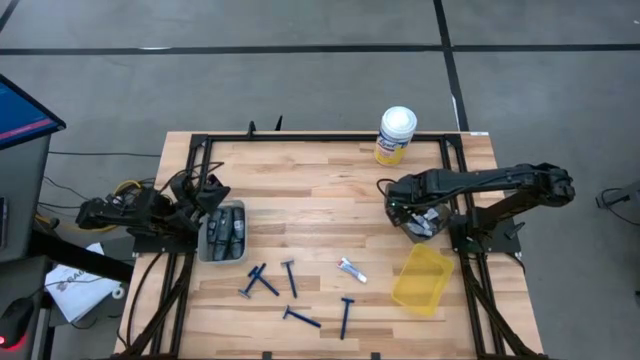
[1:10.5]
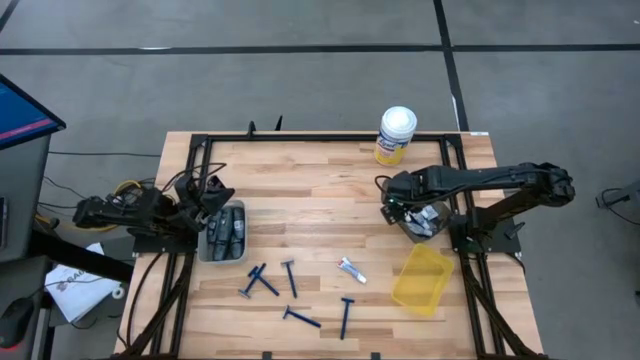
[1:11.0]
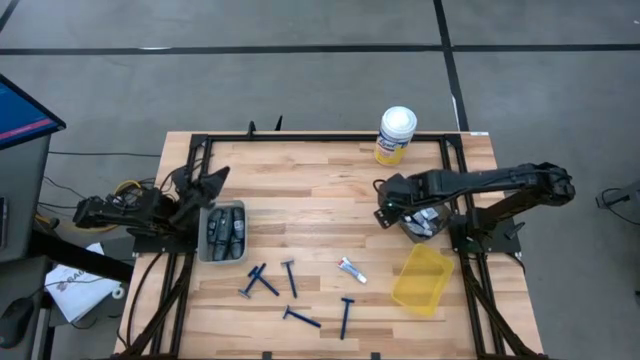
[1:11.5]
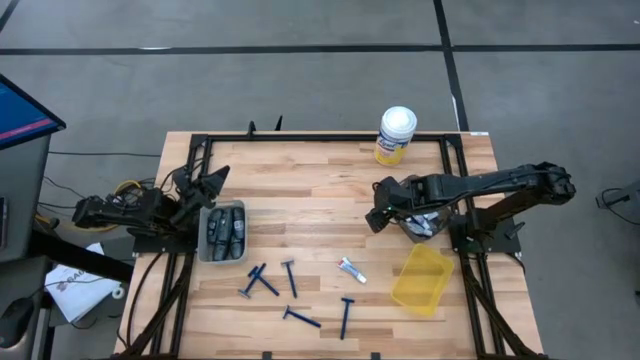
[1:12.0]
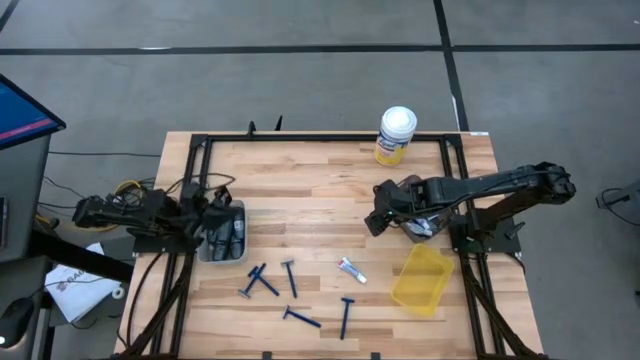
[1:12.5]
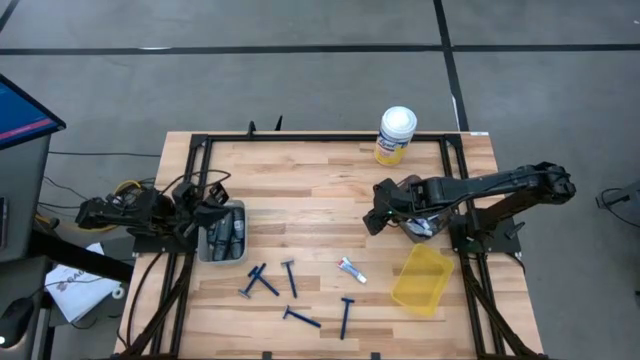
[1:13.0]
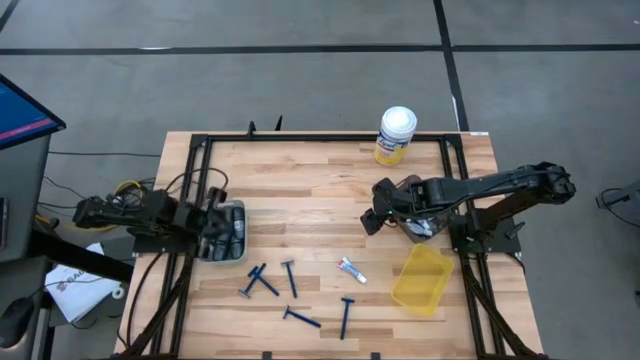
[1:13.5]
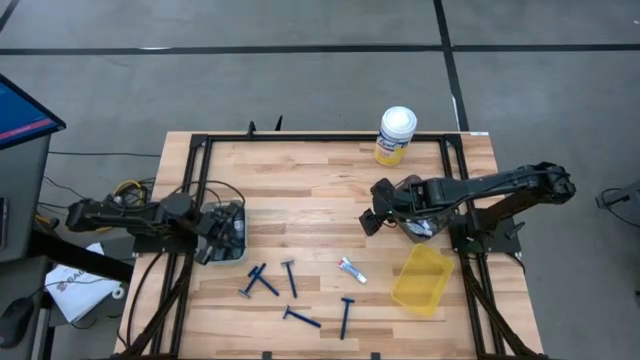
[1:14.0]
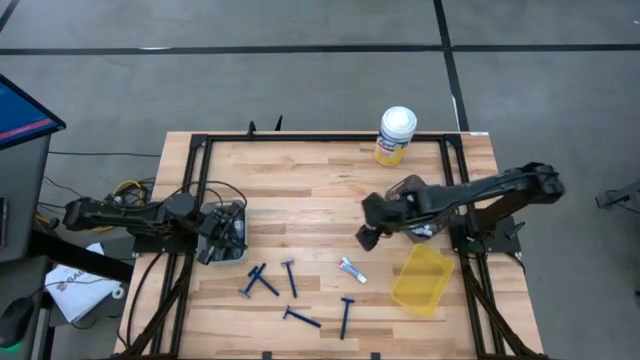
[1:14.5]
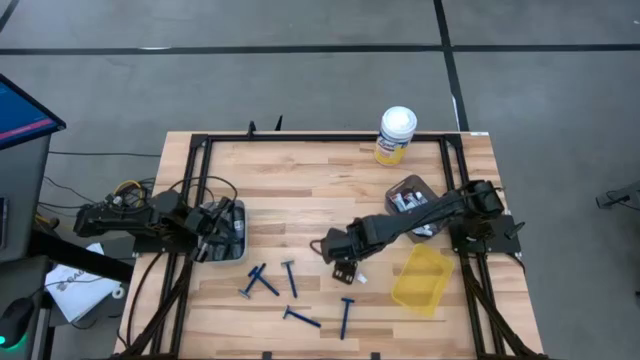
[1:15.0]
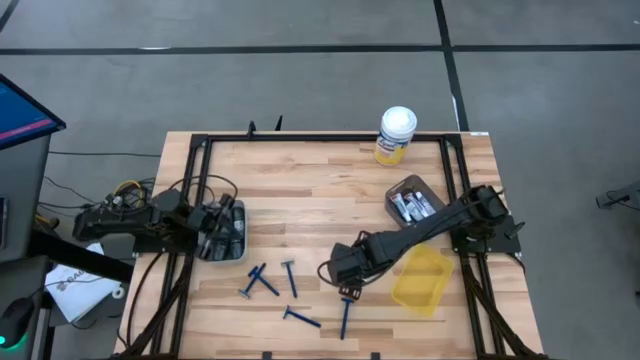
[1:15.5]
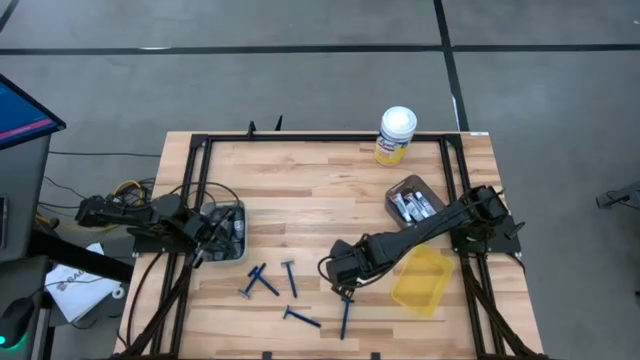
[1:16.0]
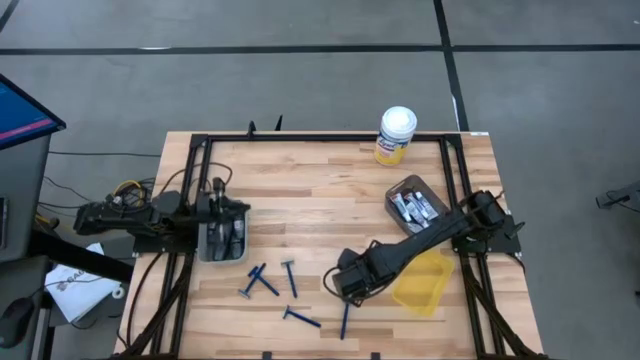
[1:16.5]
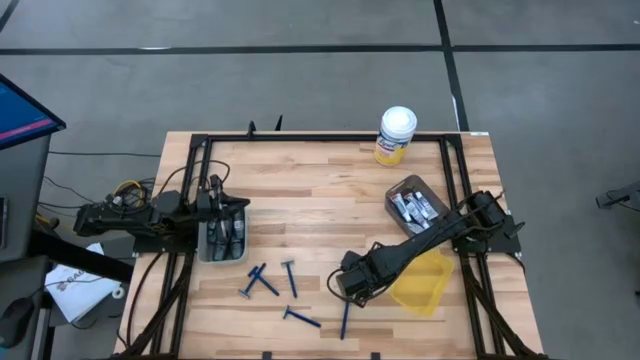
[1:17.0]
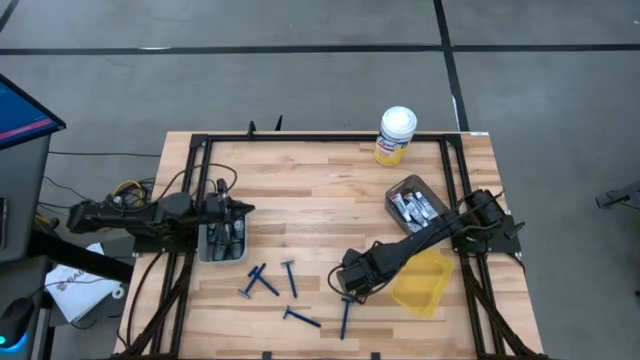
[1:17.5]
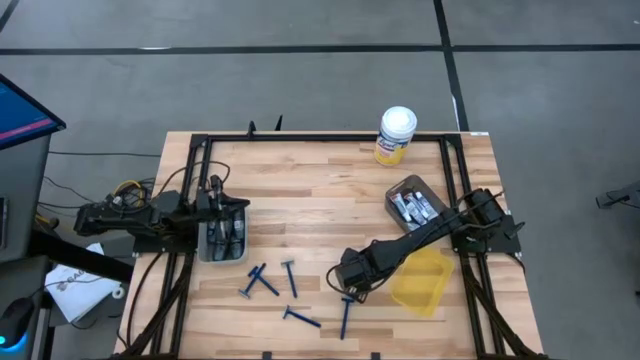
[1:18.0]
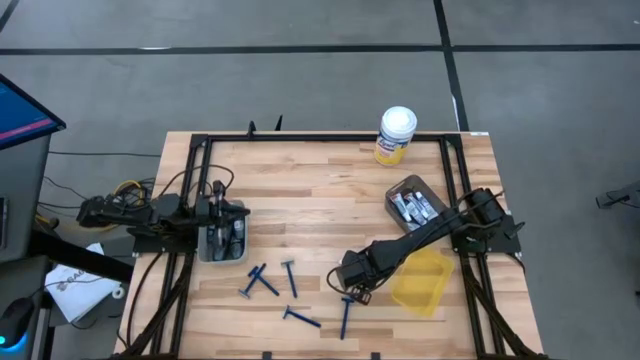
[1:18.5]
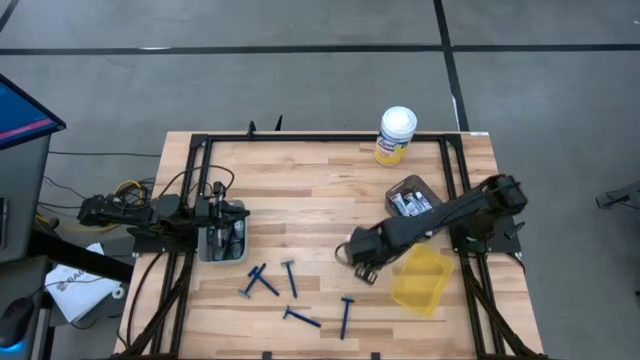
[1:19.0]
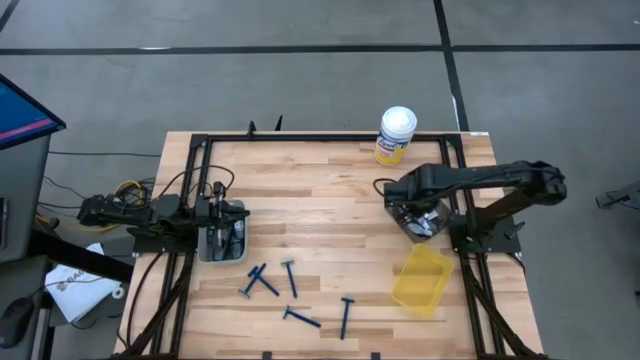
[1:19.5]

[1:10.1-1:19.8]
Task: Pick & Place Travel size toiletries
Put the white toothpaste into the black bin

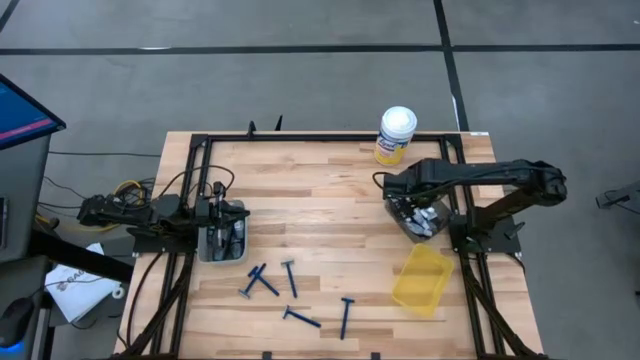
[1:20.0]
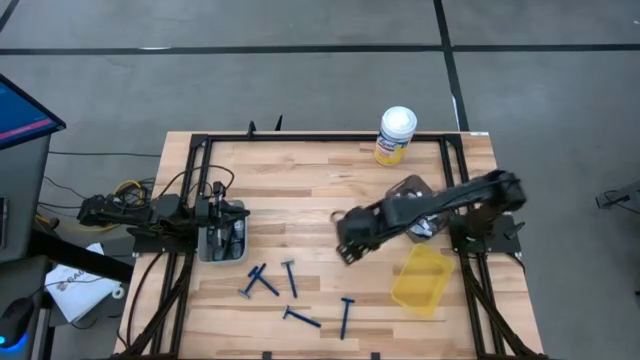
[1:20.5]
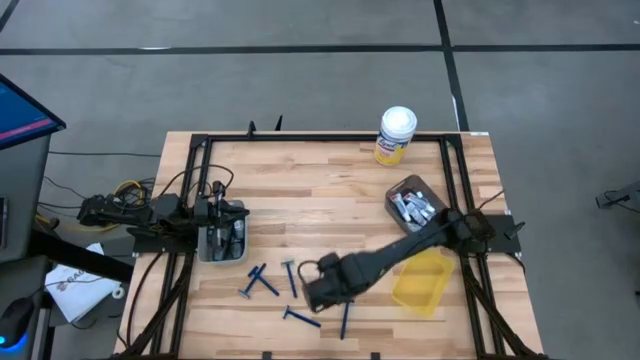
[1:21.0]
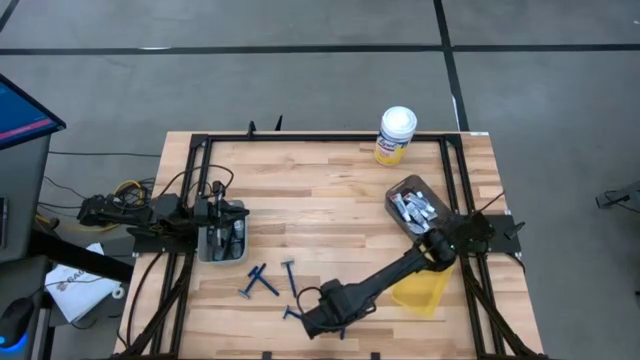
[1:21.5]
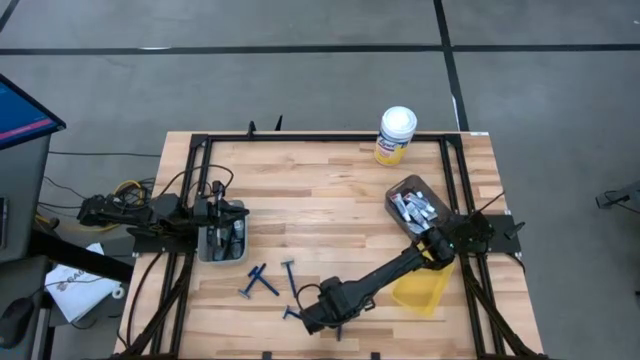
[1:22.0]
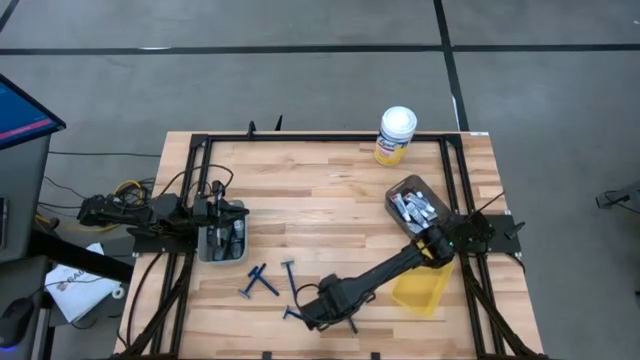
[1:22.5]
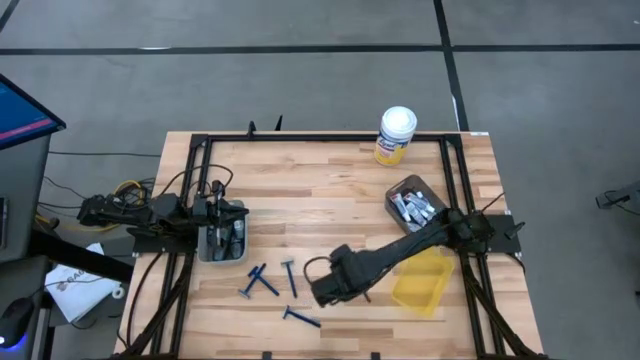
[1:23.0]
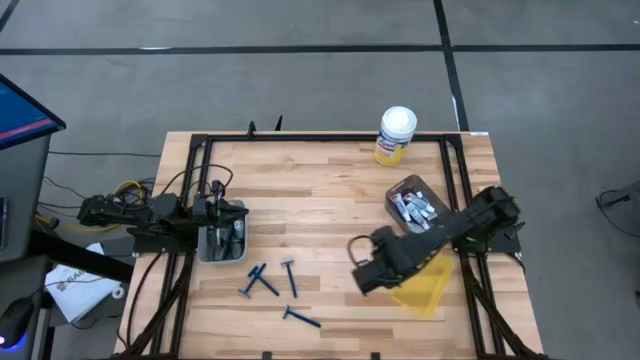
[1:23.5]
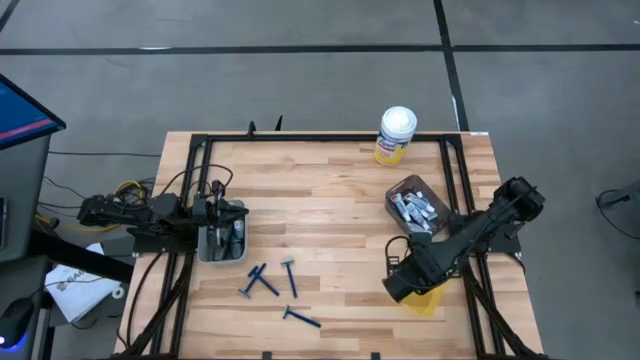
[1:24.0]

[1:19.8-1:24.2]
Put the blue razor into the yellow bin

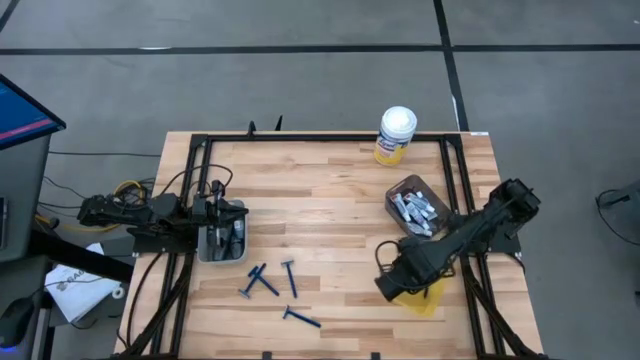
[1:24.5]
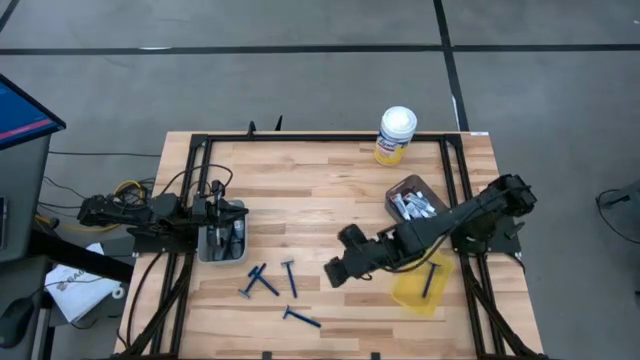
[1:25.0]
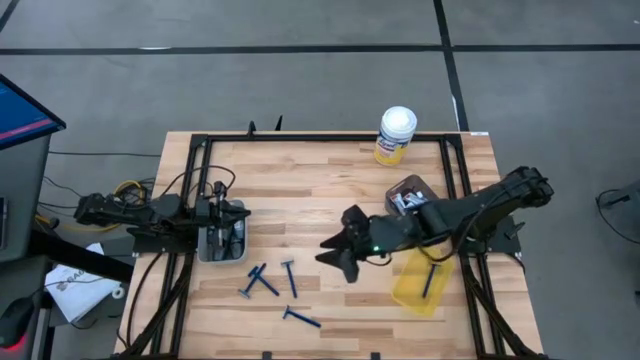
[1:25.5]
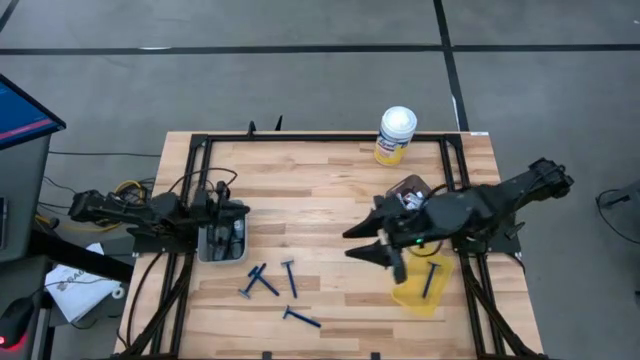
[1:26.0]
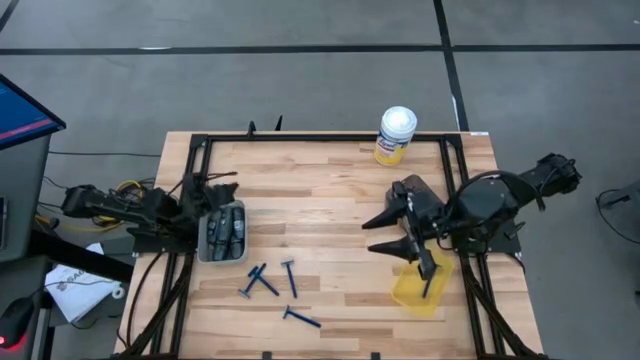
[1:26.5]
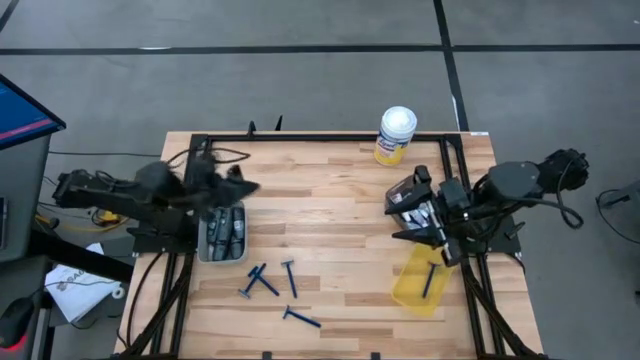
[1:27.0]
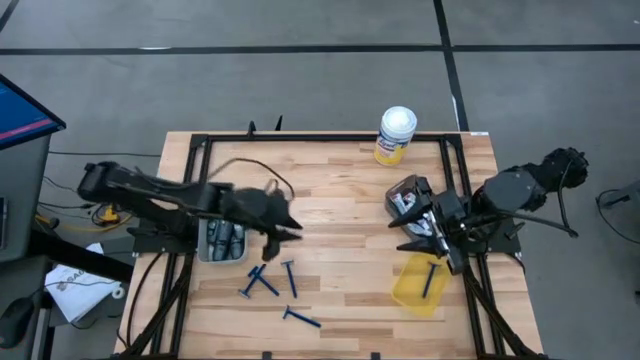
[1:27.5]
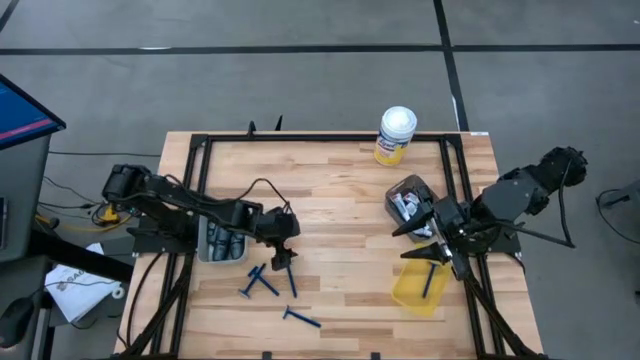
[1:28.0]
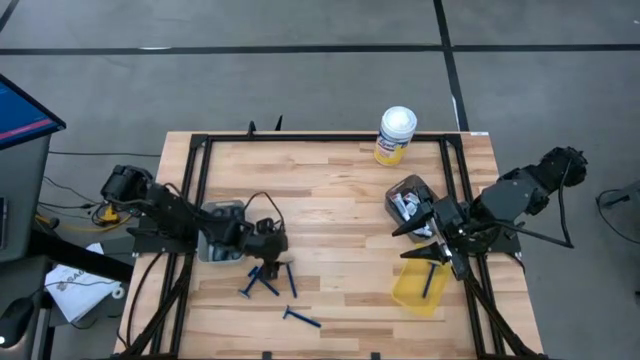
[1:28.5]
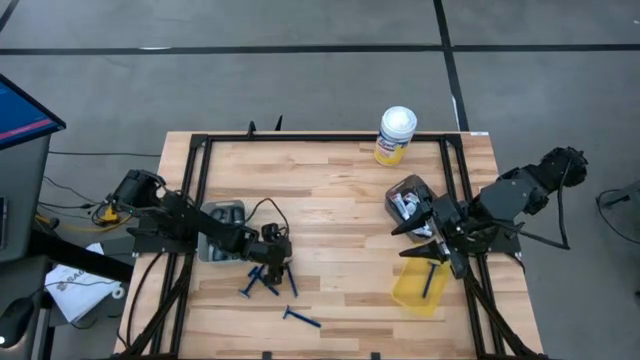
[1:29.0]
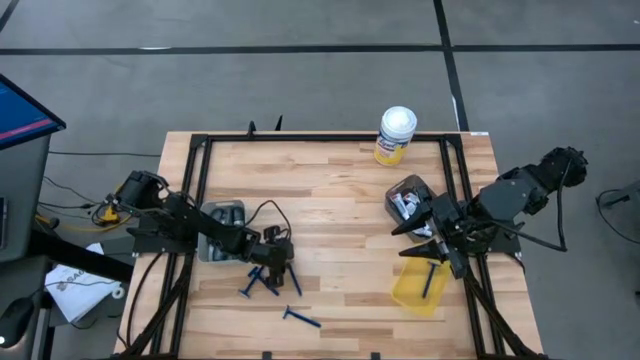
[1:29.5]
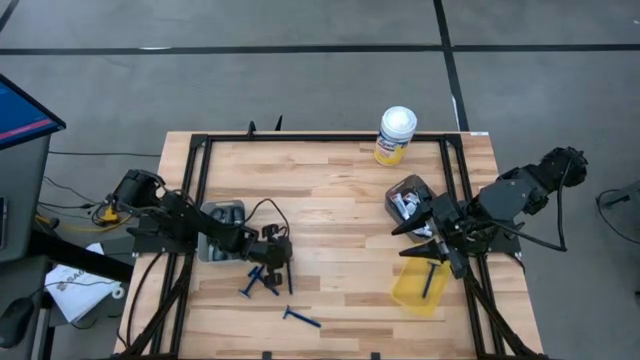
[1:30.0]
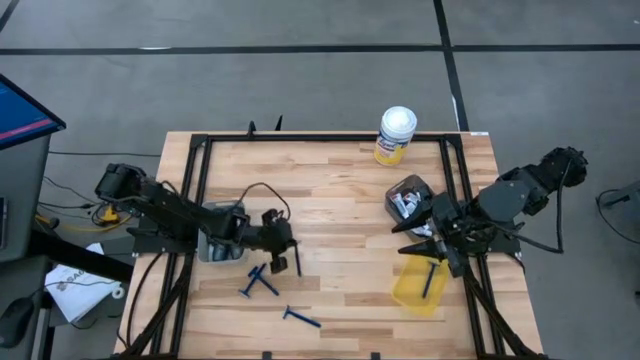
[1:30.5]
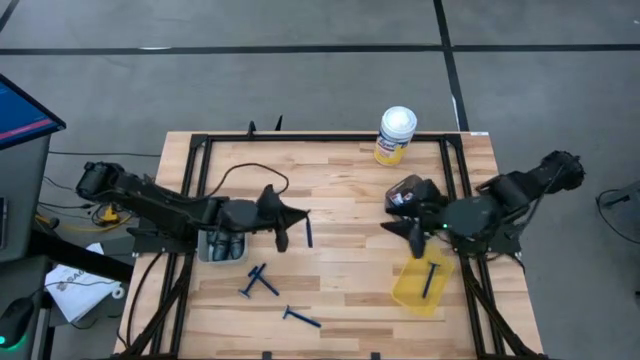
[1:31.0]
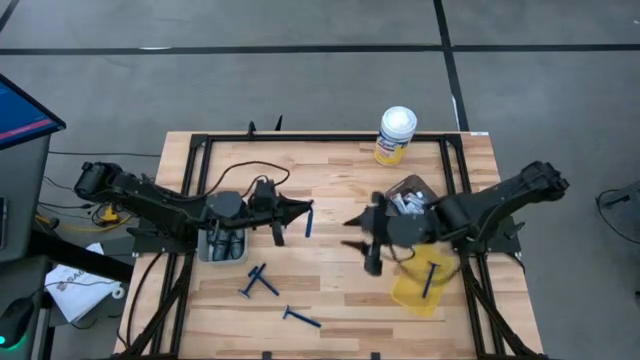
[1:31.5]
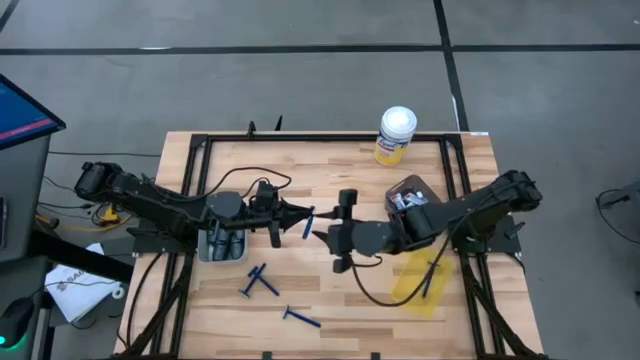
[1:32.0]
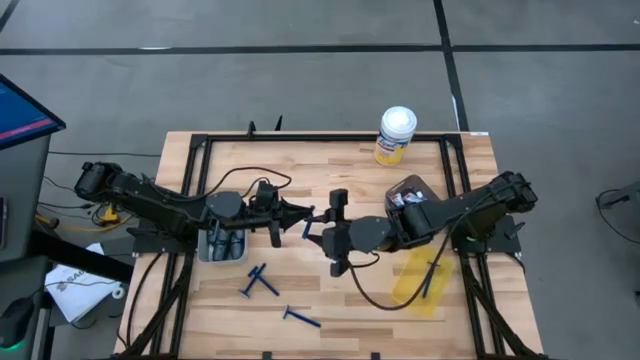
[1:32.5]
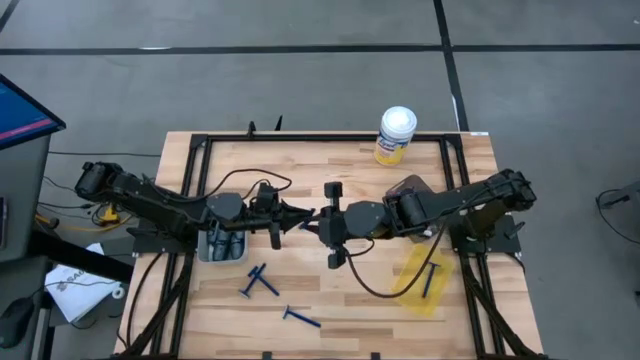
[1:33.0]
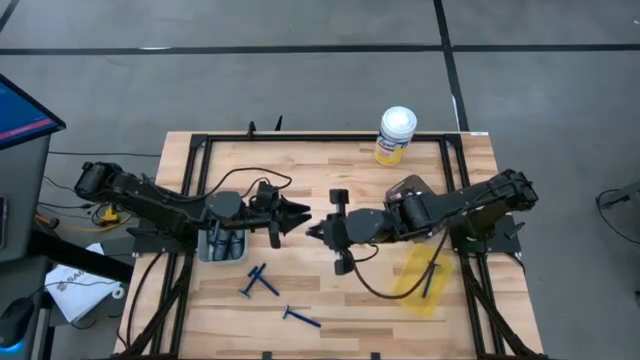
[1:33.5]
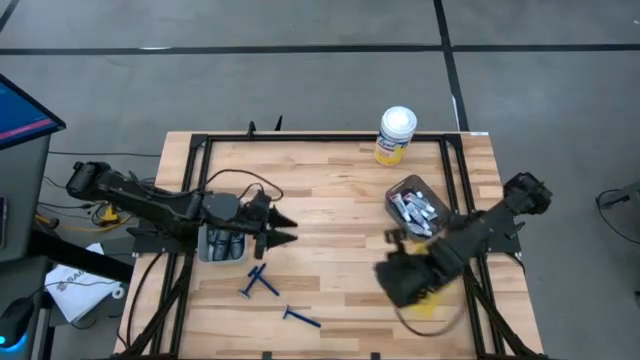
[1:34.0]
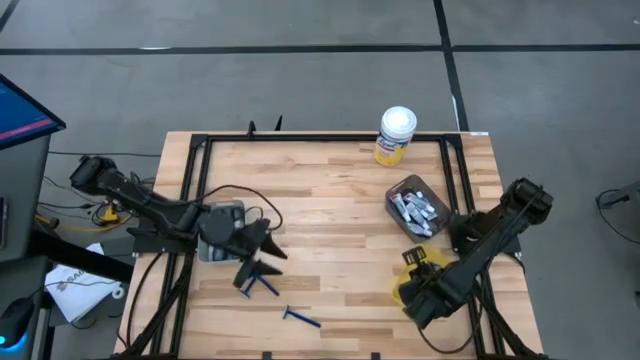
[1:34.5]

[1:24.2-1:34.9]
Put the blue razor into the yellow bin
